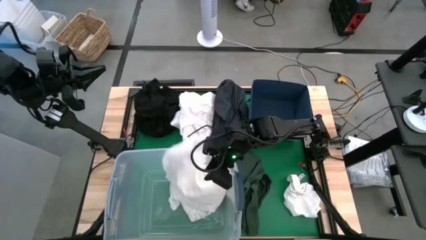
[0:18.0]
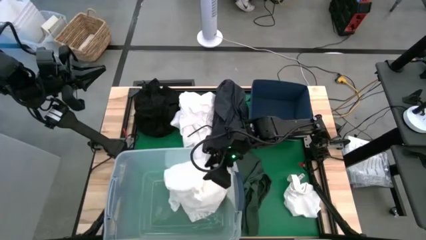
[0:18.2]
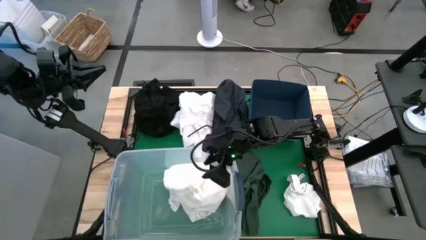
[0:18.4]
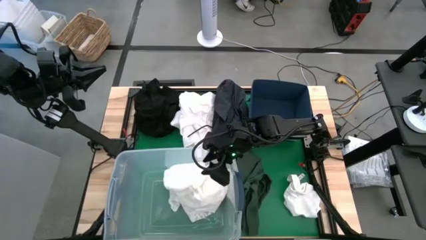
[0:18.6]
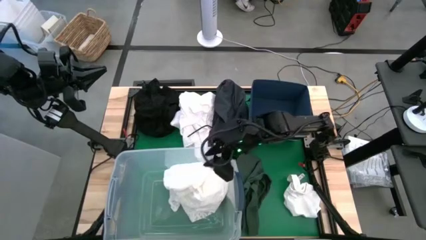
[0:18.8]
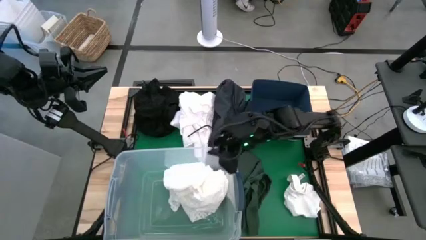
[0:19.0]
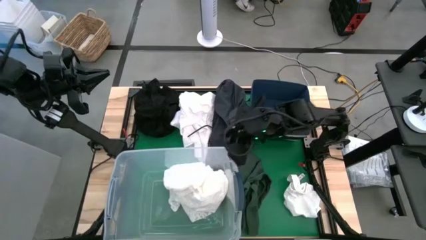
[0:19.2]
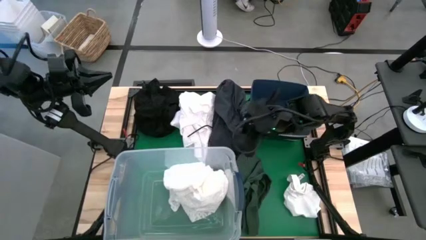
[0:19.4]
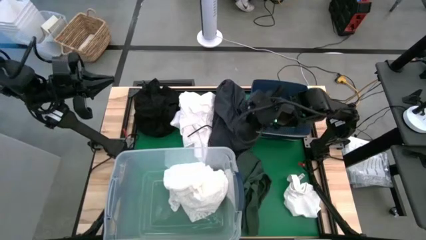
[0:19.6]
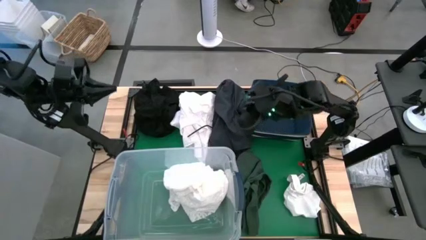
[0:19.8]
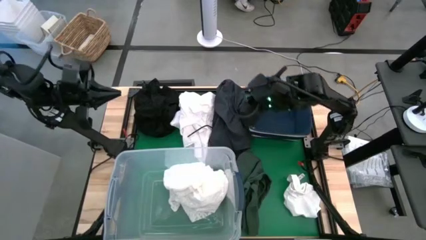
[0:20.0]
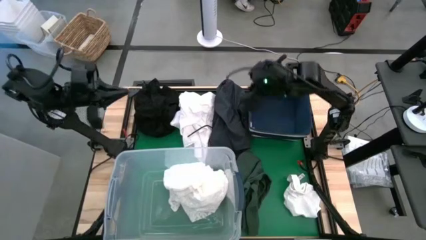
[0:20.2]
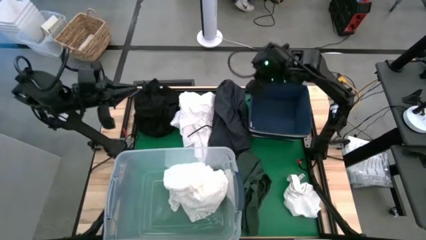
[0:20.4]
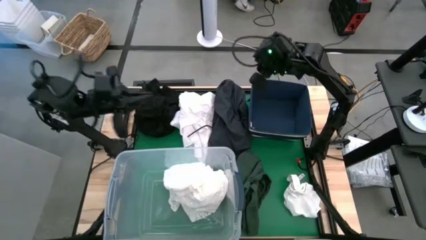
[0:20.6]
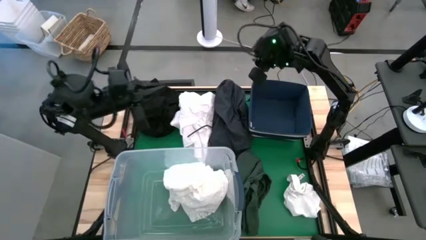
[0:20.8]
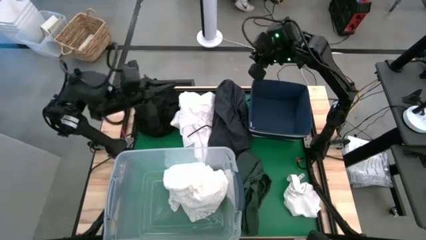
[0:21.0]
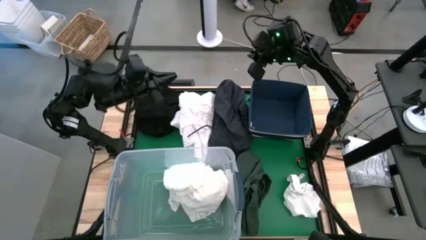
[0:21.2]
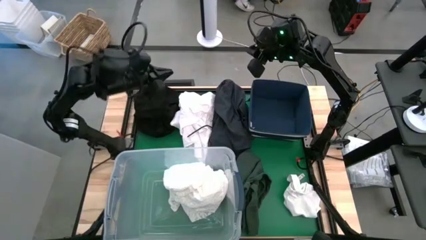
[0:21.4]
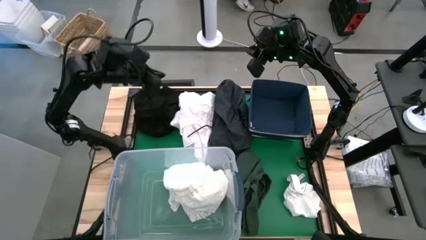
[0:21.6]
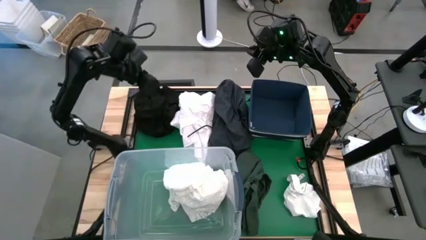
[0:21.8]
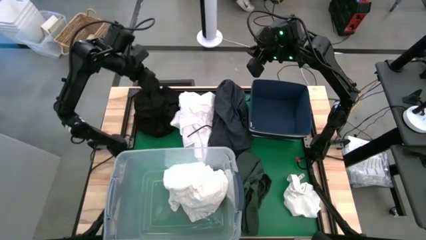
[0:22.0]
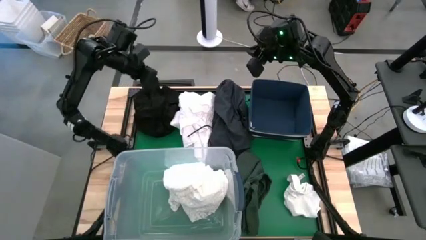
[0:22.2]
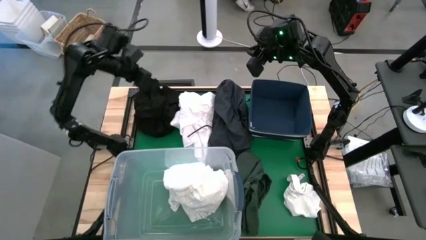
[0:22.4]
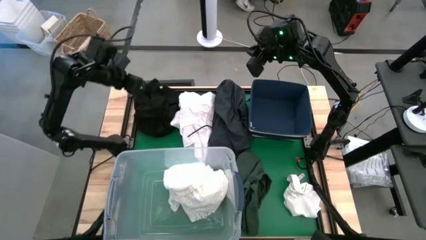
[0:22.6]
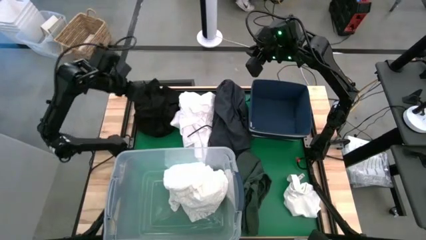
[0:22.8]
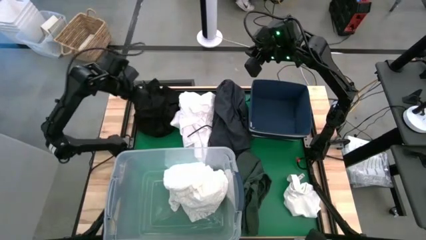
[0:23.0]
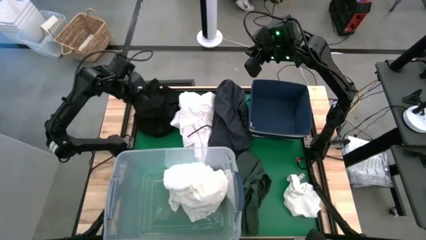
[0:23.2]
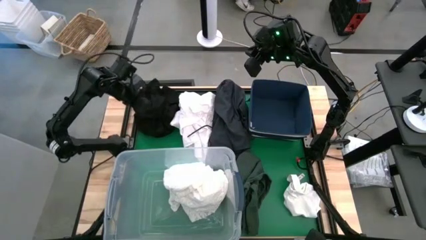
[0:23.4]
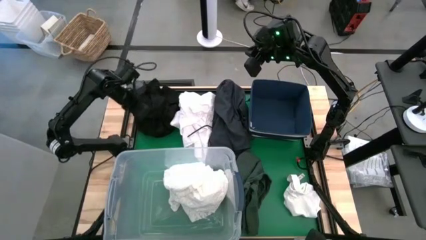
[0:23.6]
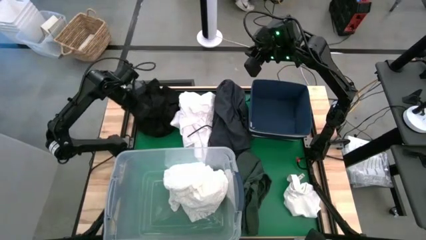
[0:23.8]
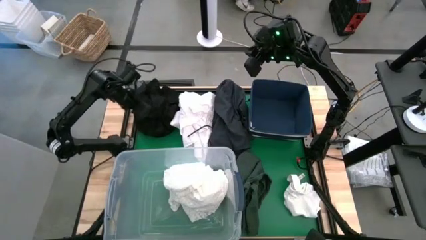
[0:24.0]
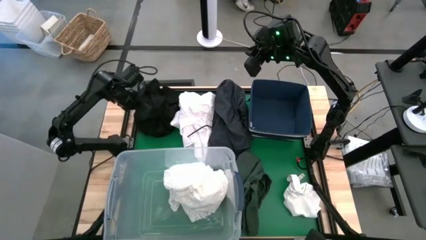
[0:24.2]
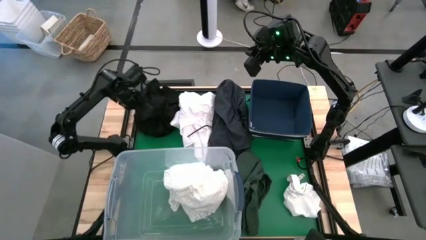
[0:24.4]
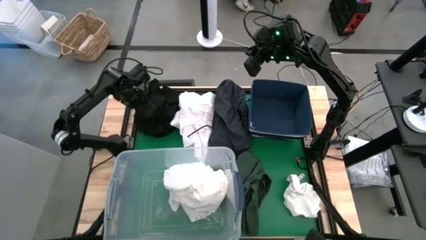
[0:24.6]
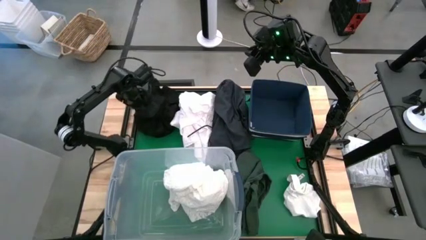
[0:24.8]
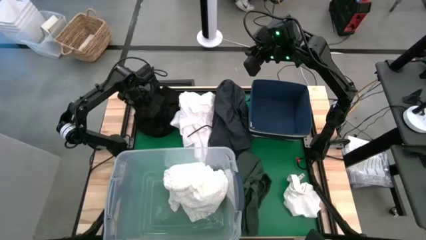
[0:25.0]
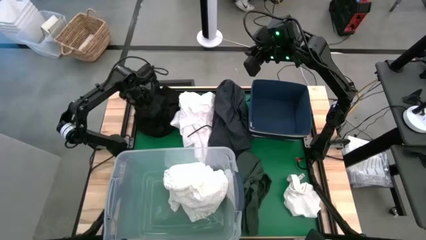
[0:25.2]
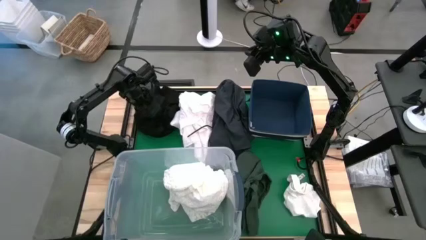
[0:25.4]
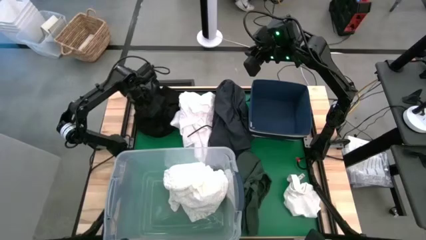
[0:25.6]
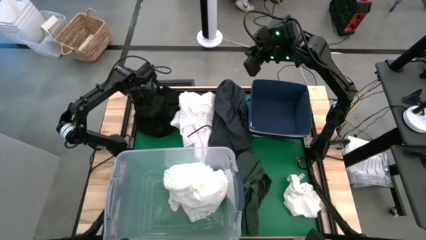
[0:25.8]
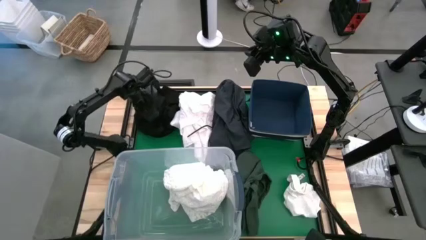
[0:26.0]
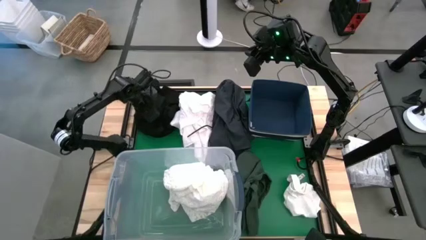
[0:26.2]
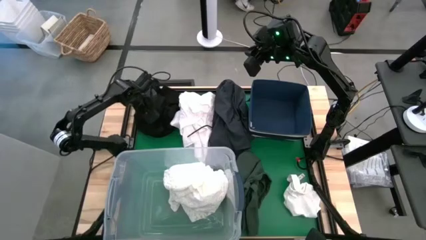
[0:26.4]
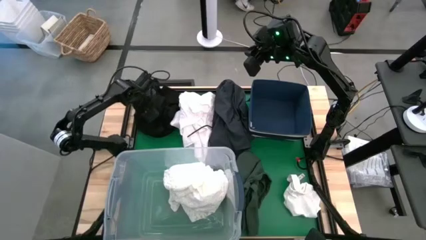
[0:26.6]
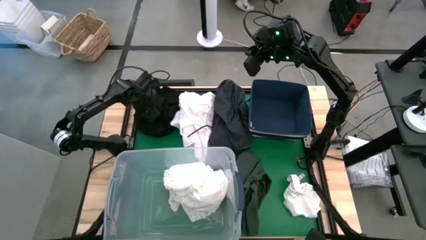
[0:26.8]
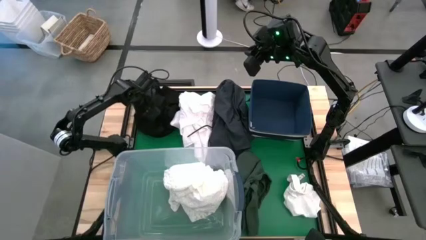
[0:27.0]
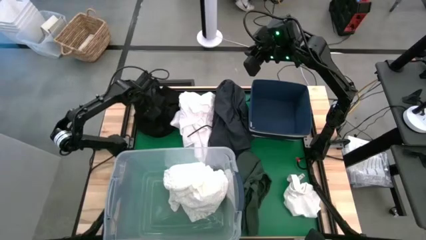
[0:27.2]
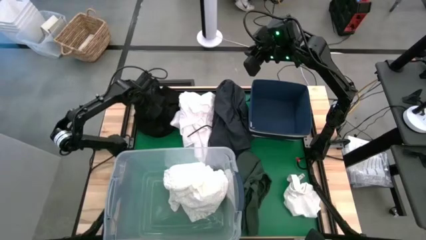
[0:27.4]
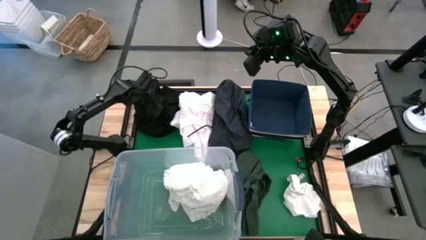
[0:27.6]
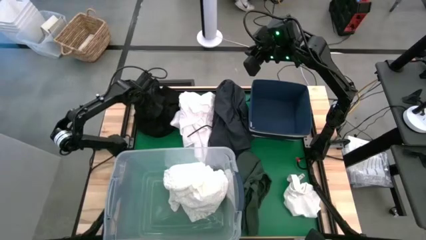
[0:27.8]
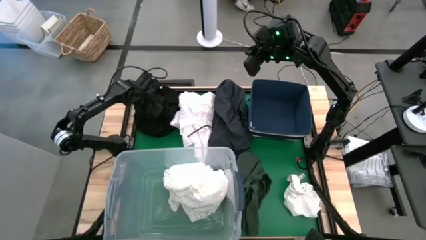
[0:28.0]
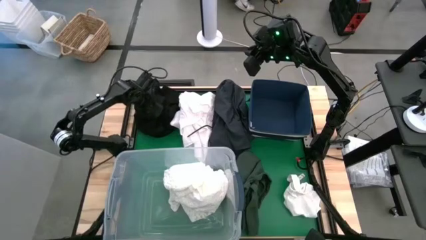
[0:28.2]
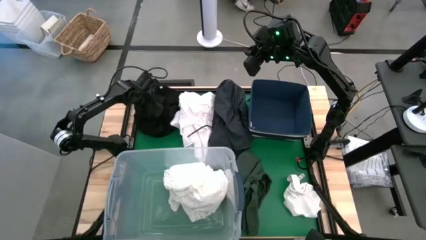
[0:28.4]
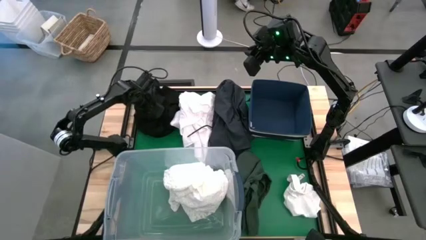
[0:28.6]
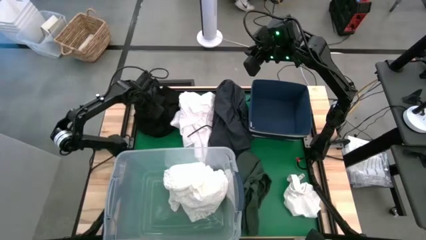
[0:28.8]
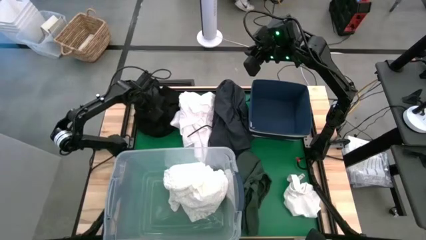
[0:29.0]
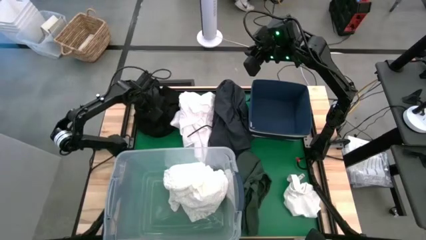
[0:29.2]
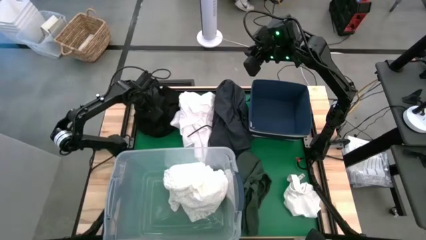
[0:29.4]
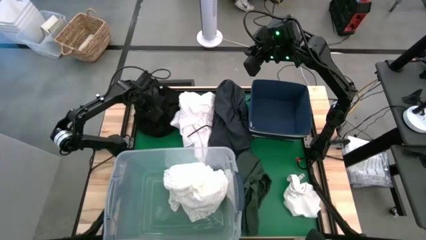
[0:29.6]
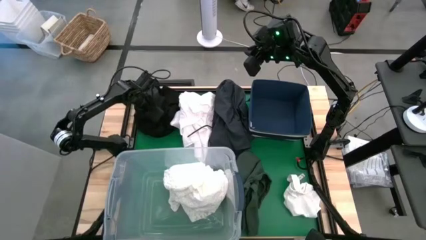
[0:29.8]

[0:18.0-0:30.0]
Put the black shirt into the blue laundry organizer
